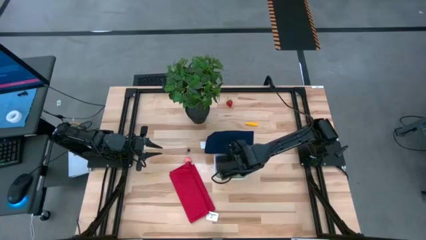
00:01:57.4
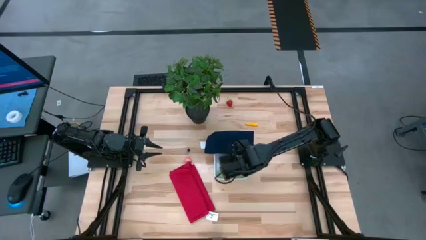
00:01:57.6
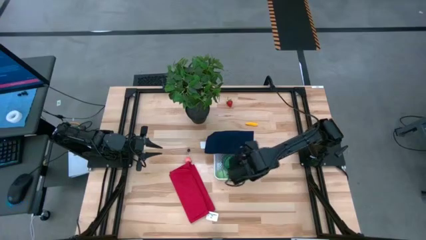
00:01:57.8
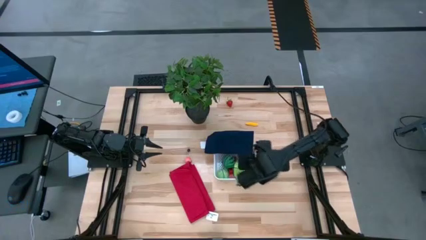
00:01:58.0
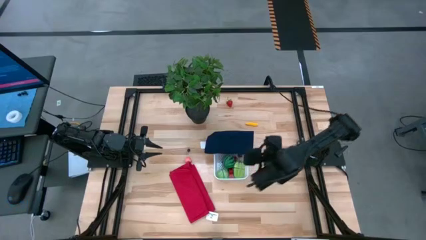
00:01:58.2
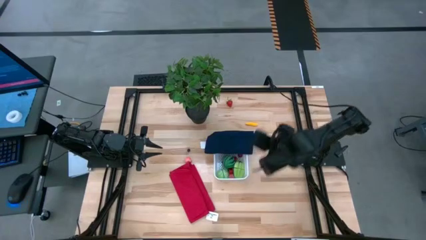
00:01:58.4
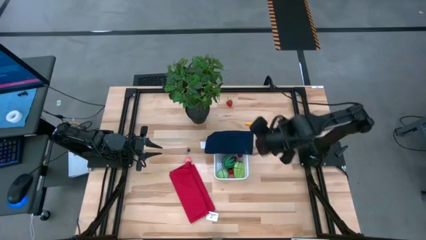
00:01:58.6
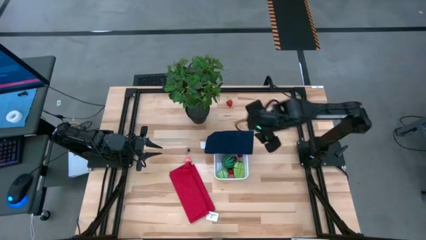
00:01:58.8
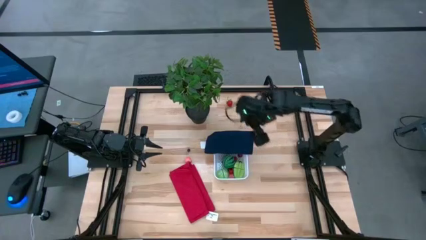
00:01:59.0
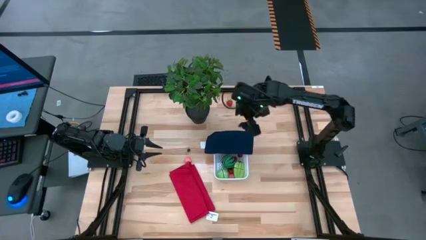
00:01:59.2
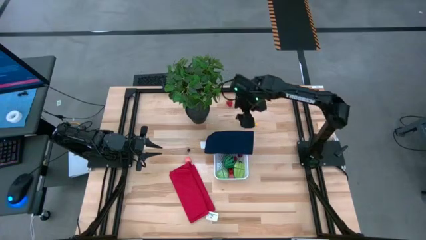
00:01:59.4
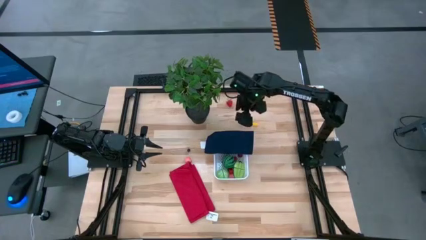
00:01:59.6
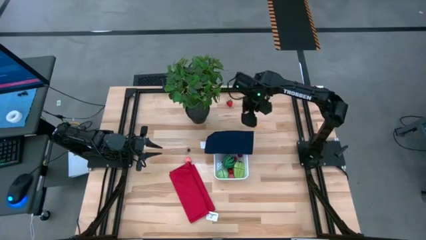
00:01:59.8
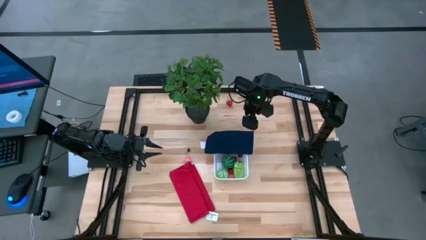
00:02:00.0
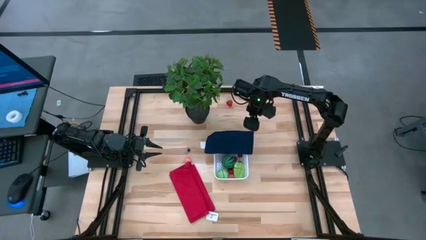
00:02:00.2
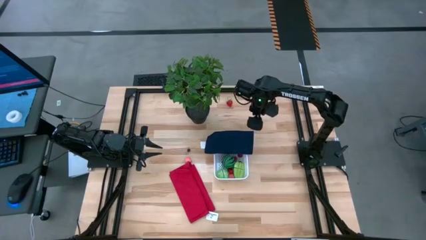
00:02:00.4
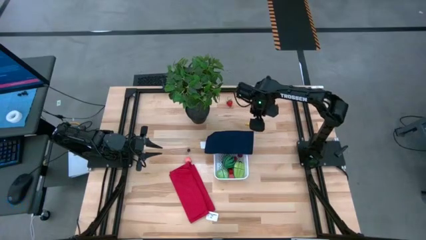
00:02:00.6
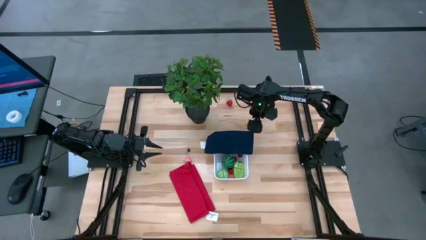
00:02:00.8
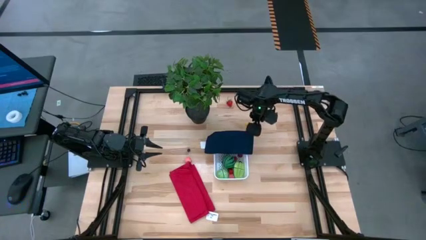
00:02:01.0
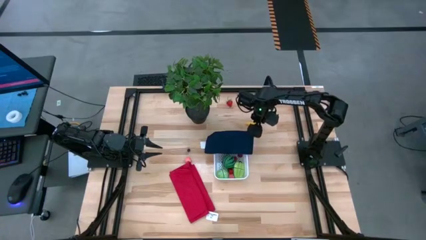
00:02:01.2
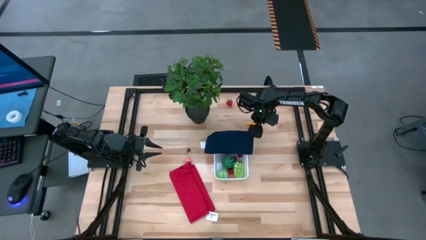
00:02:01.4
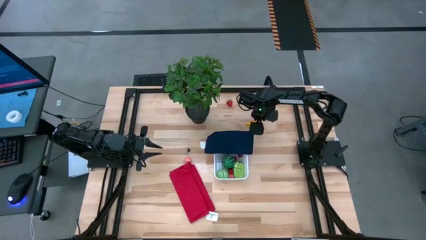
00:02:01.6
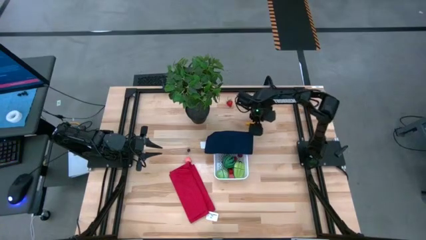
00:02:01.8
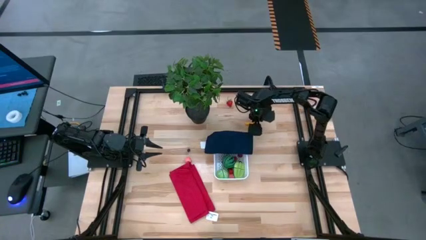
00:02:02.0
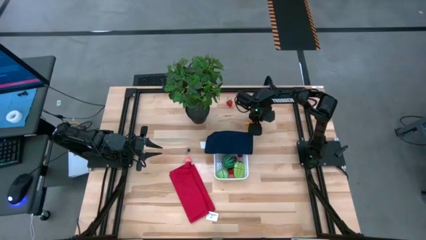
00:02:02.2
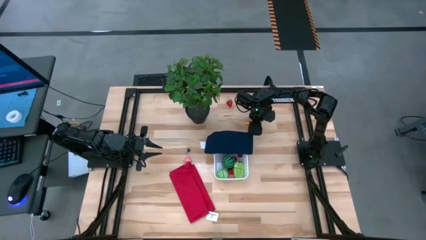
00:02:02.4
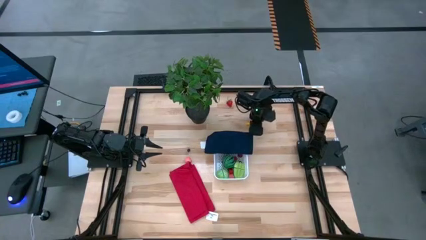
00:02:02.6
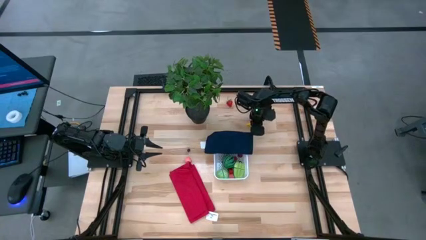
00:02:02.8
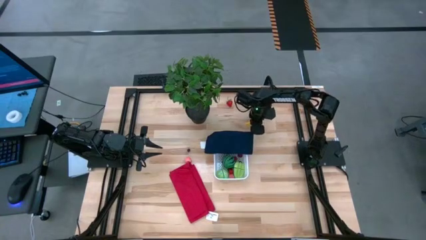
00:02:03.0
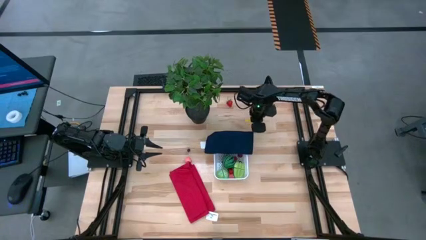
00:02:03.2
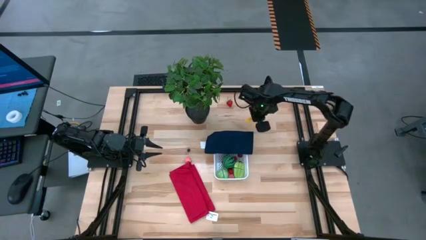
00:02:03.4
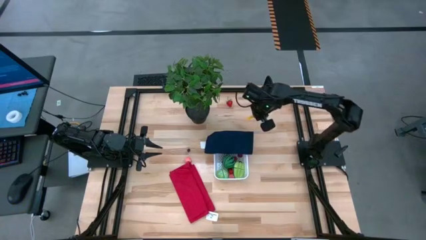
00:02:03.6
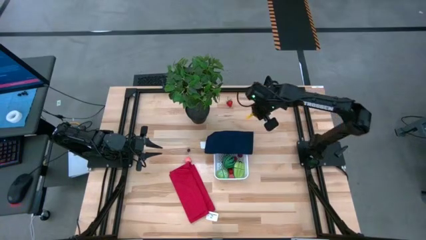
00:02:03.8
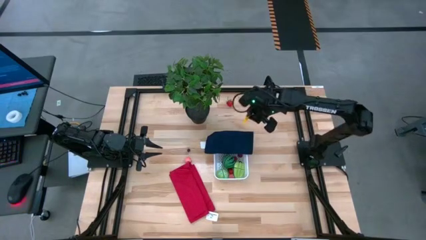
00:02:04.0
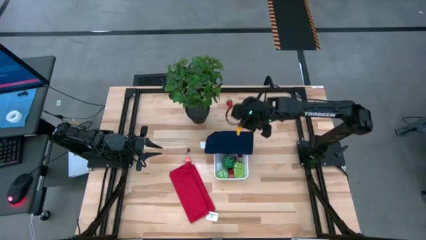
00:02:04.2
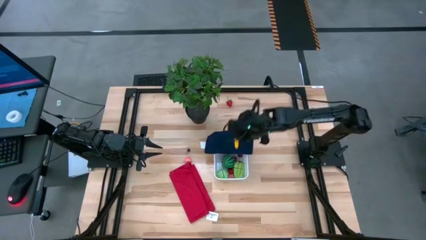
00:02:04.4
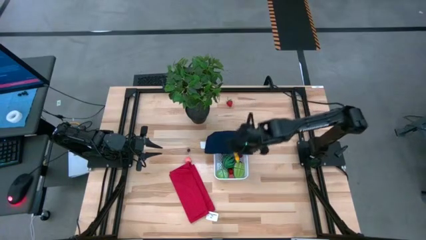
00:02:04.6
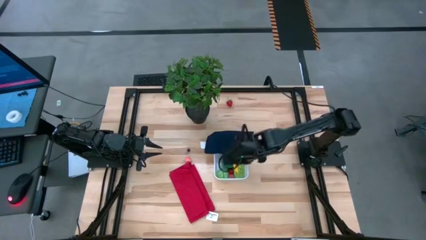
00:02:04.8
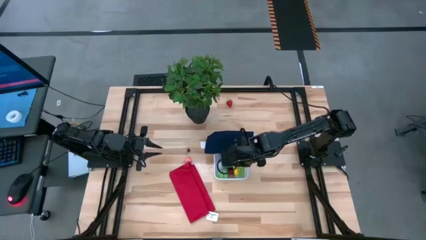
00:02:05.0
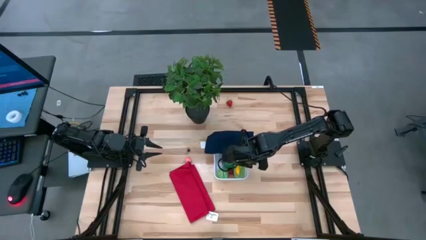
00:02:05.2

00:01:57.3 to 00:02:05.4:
Task: Pick and placing Produce into tupperware
Put the corn into the bin

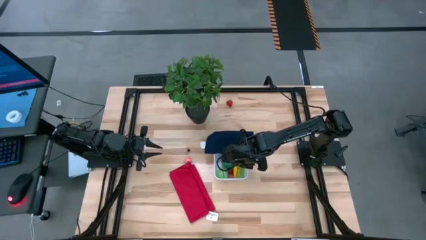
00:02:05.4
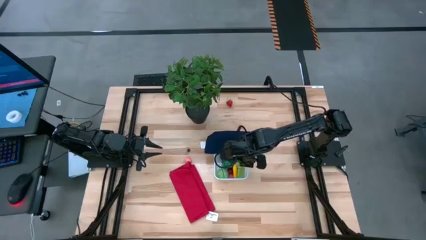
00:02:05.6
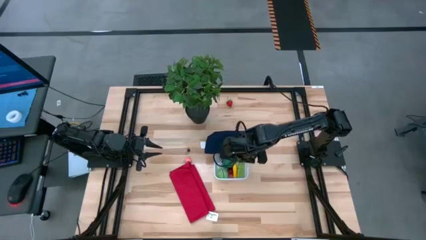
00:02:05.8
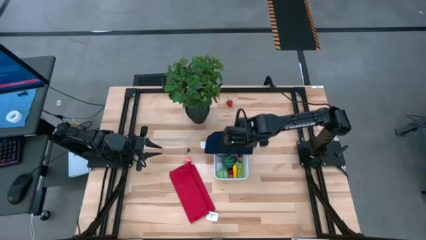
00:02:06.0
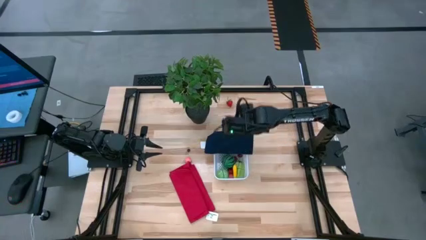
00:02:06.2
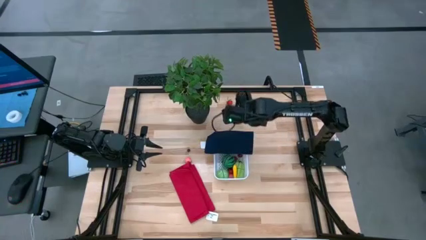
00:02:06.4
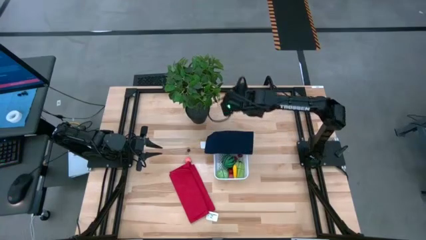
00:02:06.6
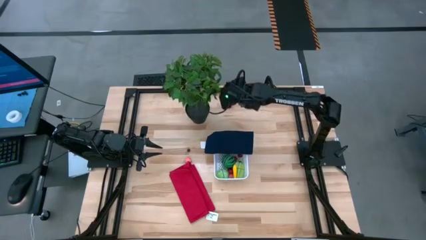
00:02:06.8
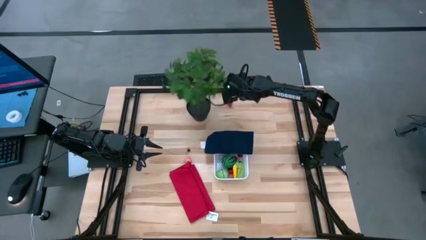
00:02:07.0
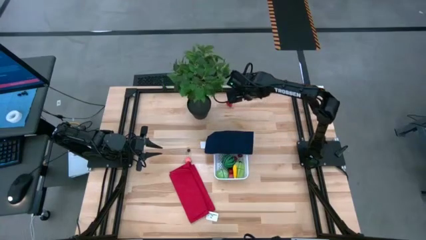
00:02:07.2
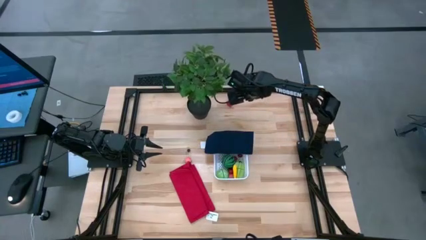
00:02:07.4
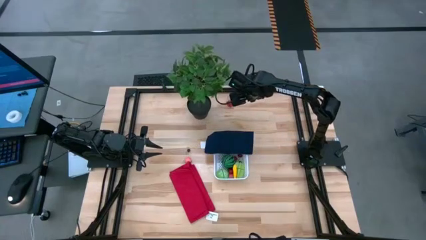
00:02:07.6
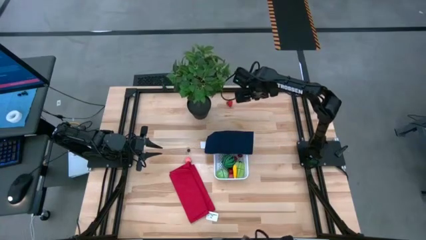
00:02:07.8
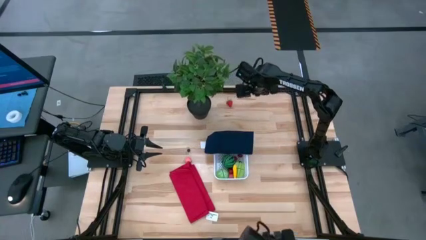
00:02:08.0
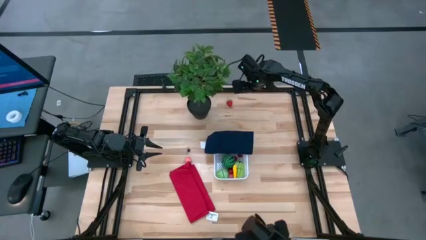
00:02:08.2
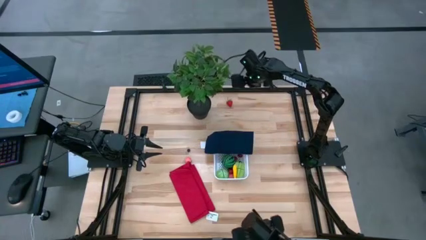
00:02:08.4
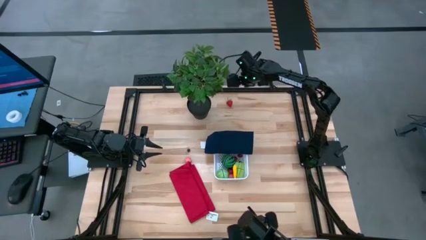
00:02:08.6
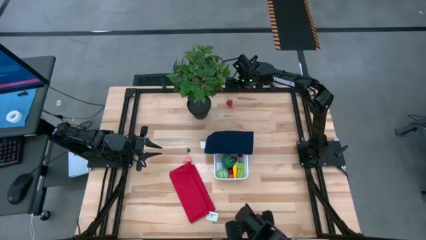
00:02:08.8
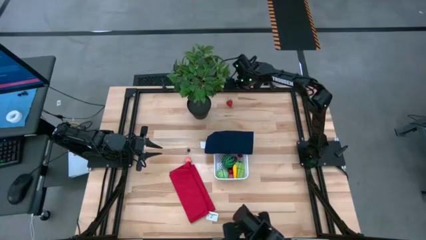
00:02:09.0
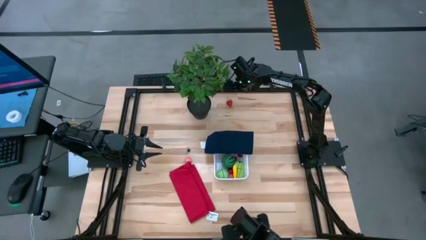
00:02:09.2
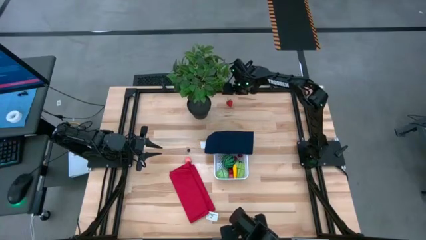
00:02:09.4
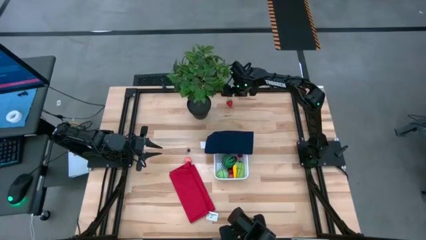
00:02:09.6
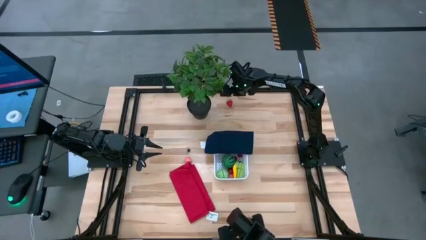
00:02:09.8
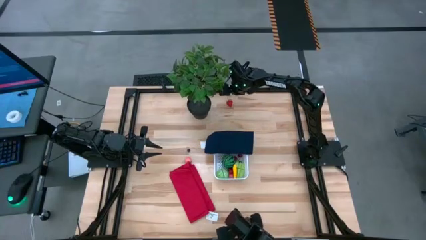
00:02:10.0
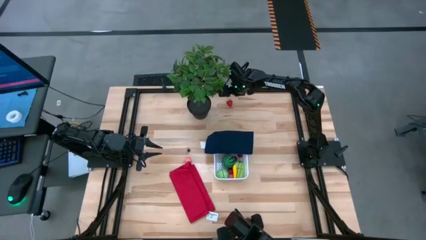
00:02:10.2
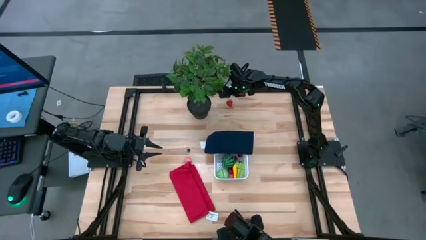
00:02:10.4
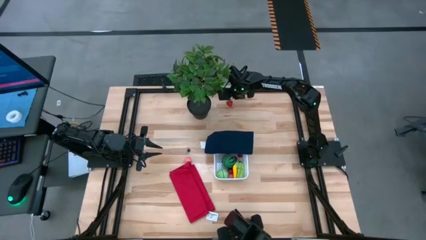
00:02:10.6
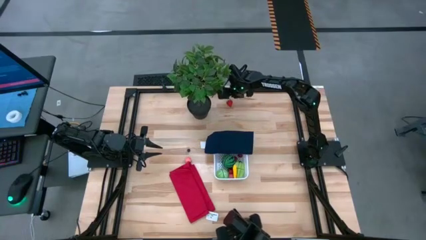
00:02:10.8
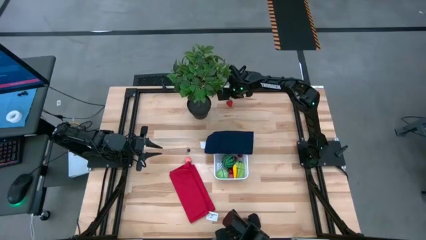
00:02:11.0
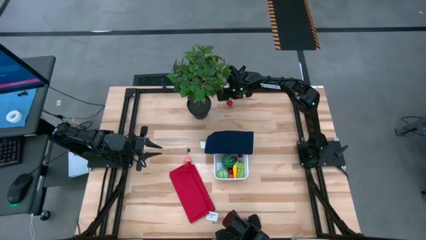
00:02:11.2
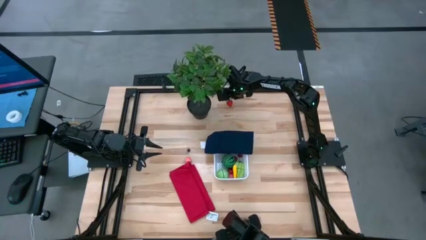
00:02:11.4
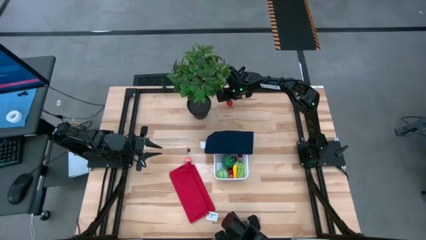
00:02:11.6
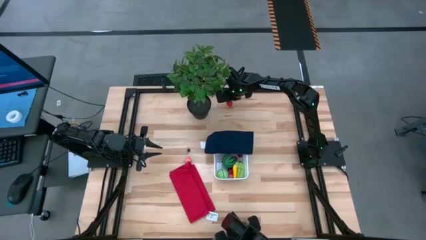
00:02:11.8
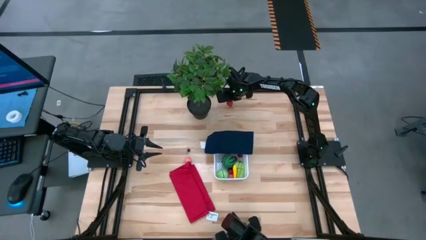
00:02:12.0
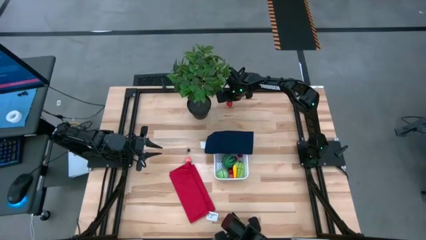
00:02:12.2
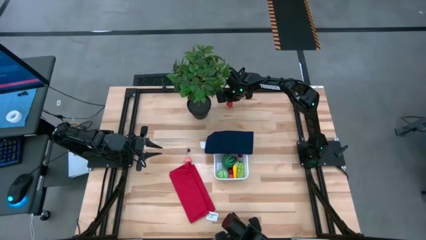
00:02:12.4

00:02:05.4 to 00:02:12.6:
Put the strawberry into the bin

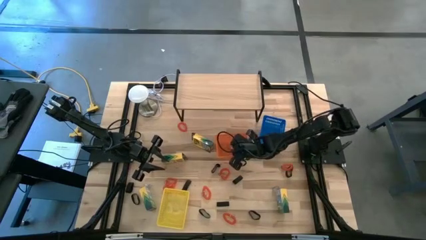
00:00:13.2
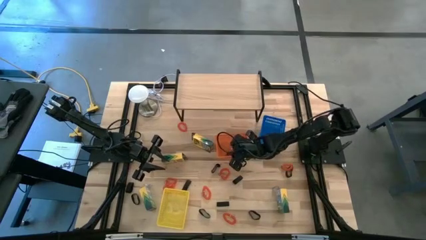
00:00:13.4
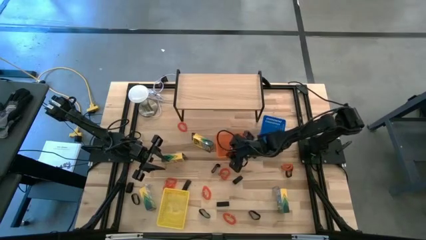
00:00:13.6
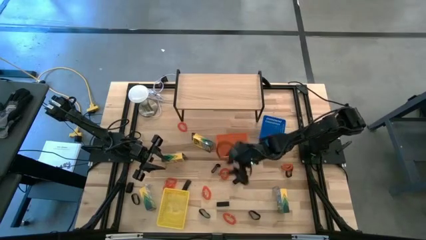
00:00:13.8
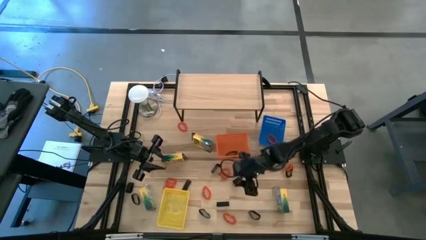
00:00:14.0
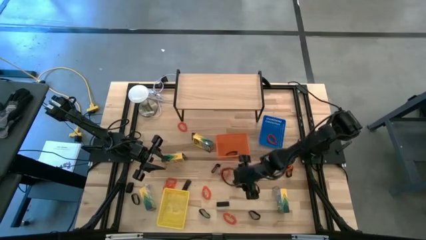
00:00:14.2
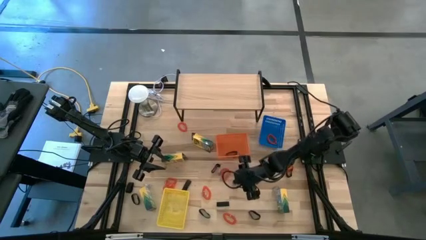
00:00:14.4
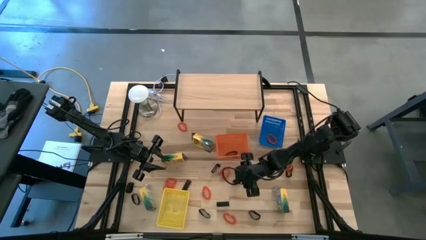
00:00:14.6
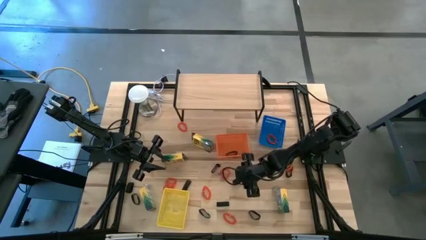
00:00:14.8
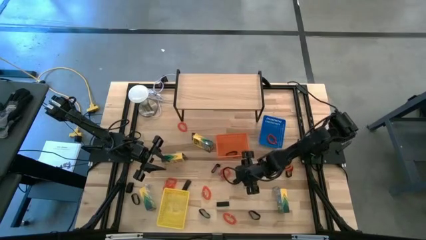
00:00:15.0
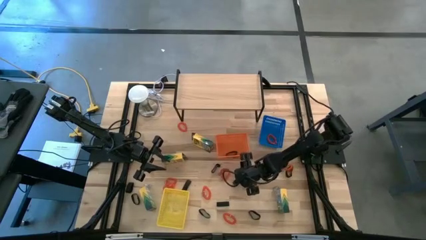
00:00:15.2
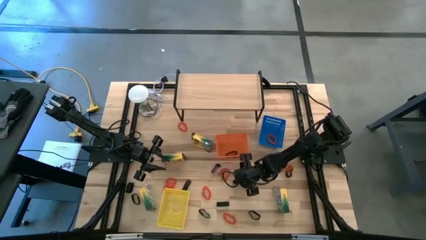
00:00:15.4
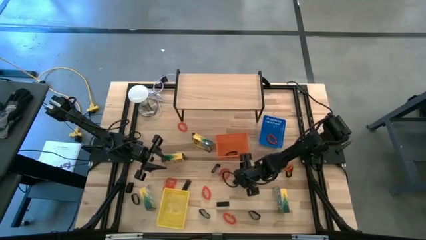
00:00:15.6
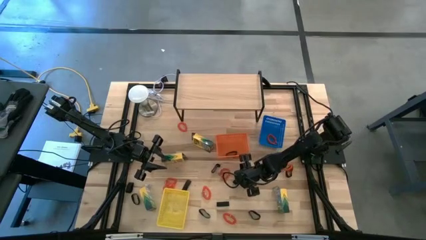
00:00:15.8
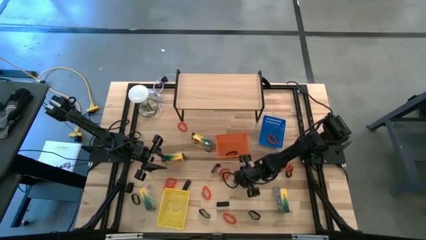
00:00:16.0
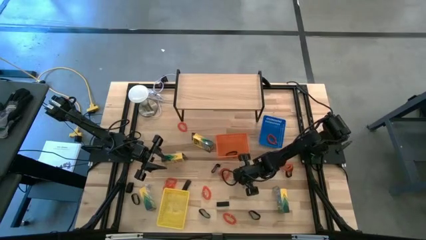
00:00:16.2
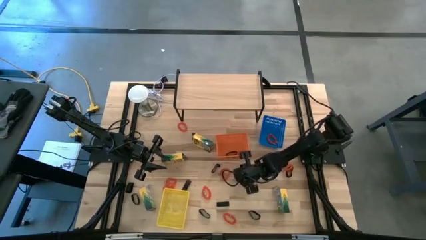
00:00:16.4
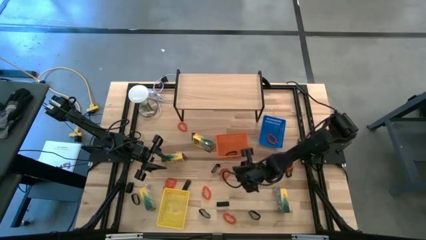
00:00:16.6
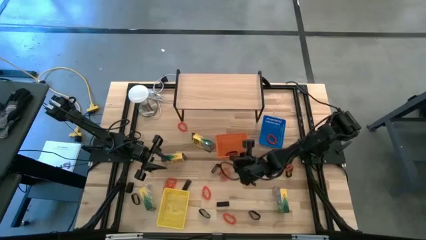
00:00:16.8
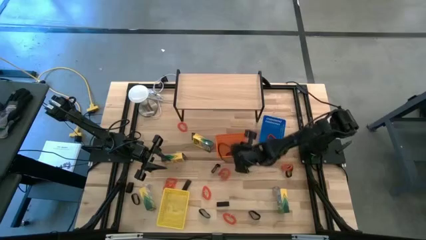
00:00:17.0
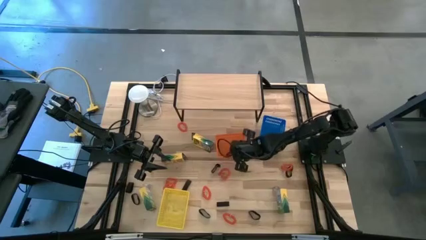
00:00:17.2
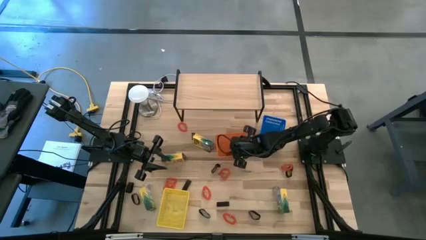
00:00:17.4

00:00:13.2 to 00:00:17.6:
Task: Pick & Place Office Desk Supplies
Put the rubberband into the orange bin
